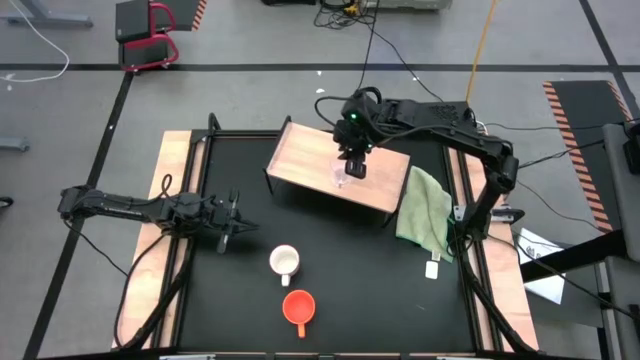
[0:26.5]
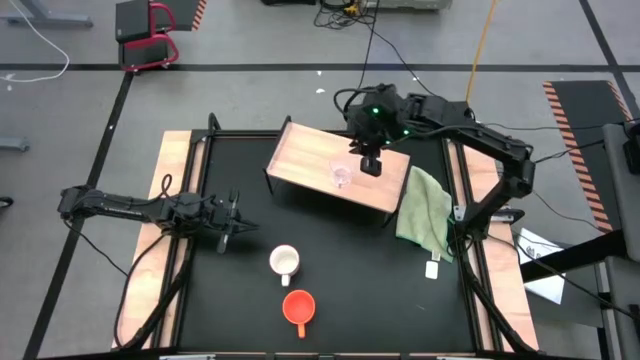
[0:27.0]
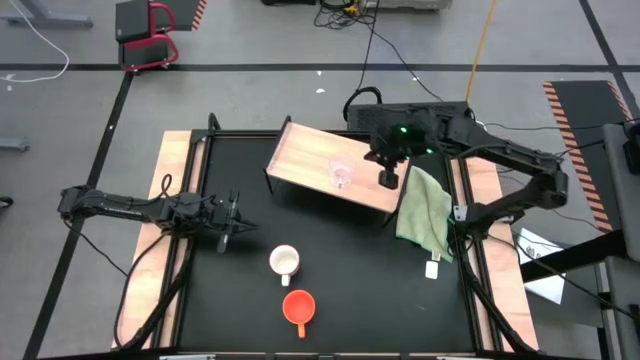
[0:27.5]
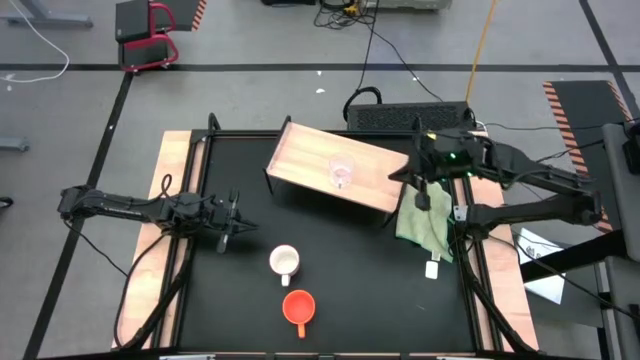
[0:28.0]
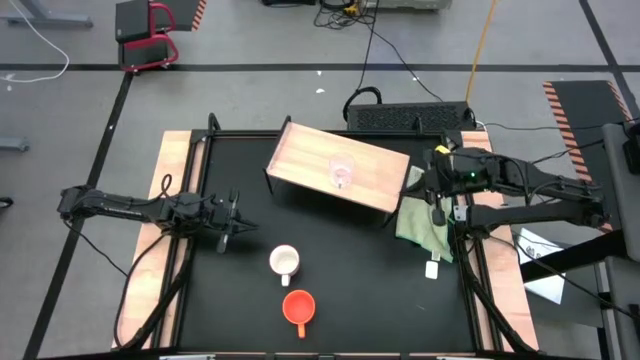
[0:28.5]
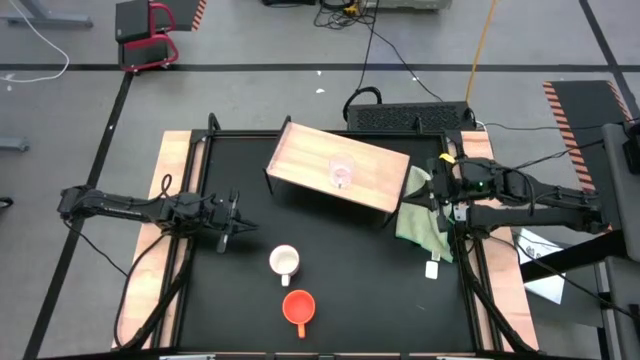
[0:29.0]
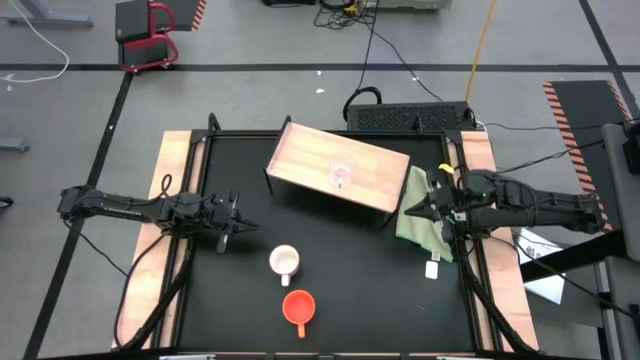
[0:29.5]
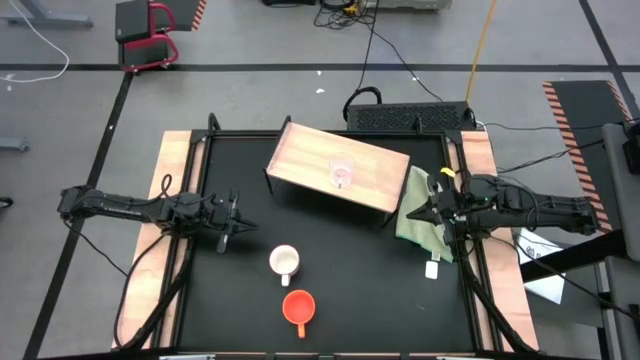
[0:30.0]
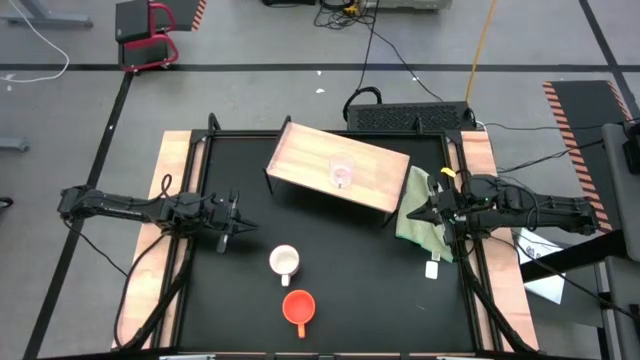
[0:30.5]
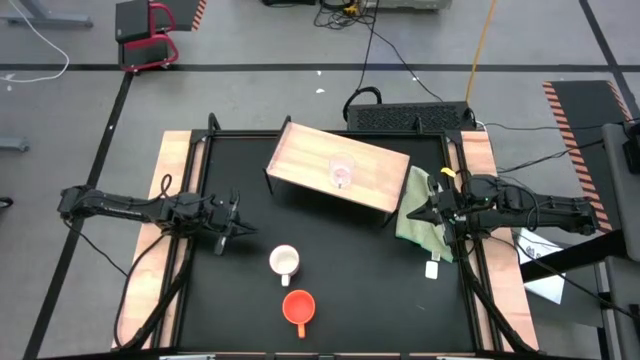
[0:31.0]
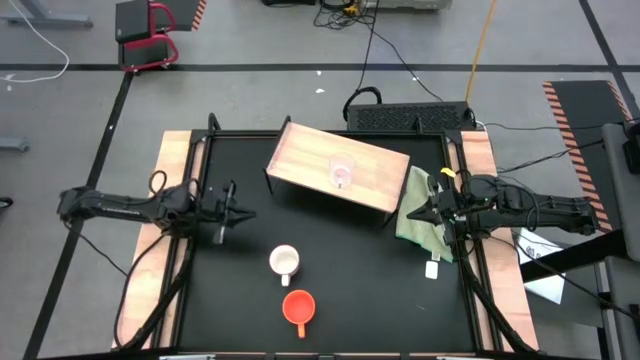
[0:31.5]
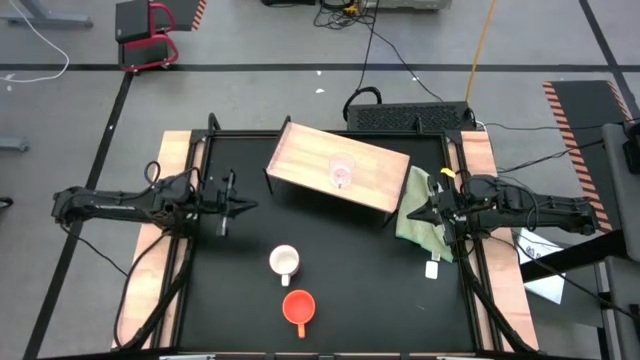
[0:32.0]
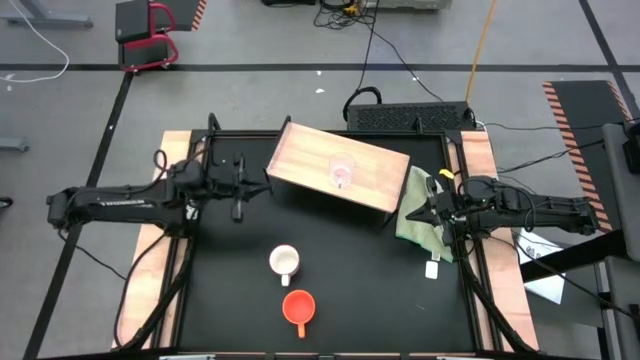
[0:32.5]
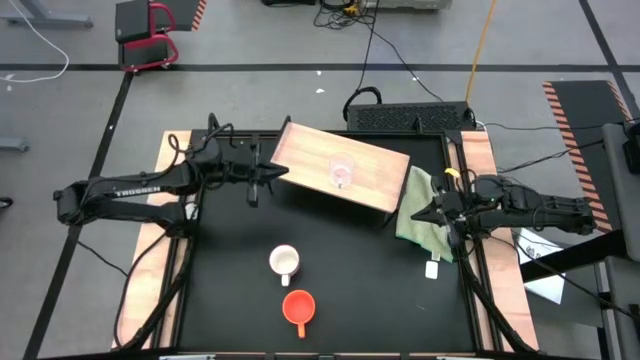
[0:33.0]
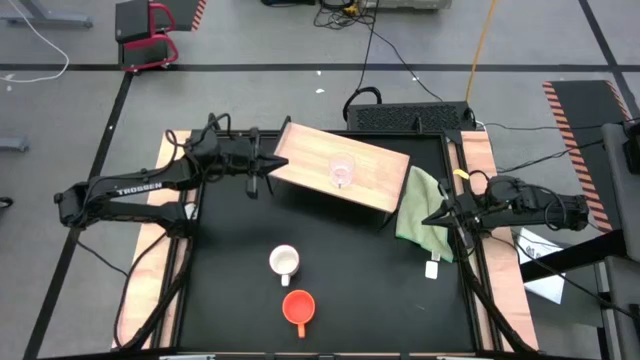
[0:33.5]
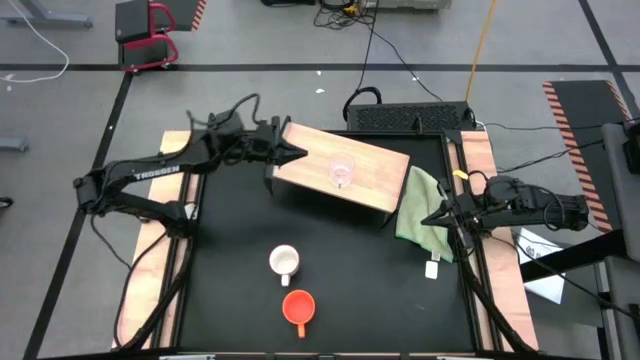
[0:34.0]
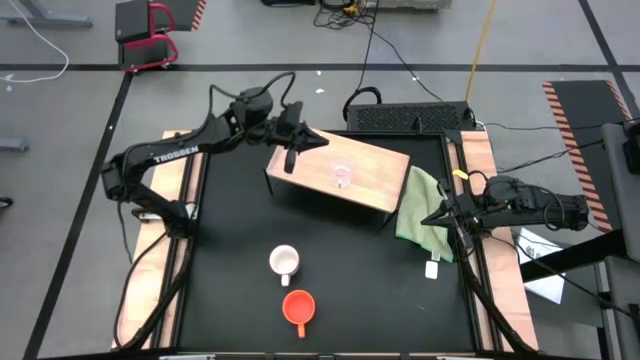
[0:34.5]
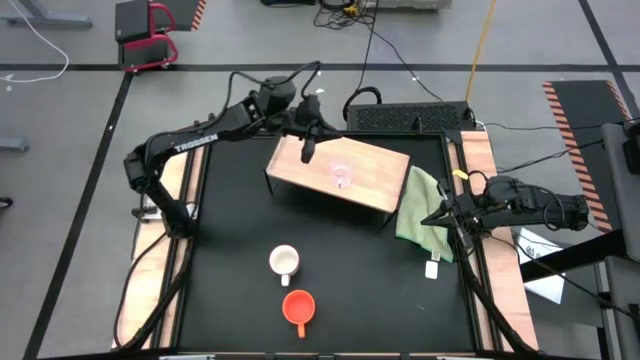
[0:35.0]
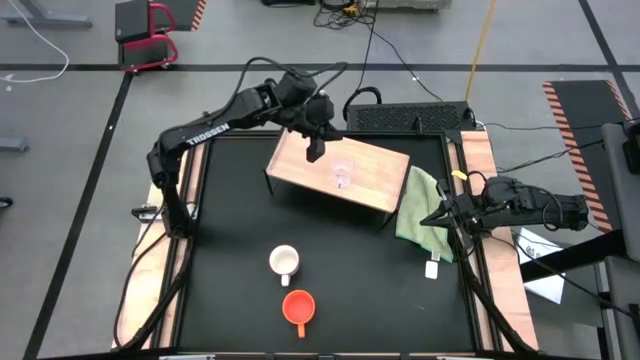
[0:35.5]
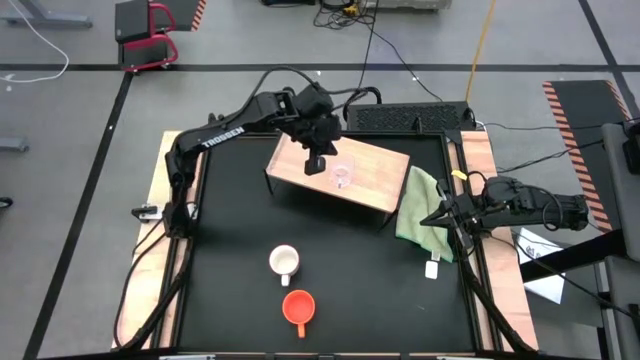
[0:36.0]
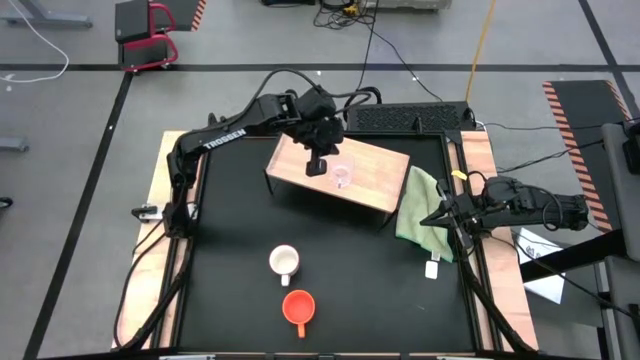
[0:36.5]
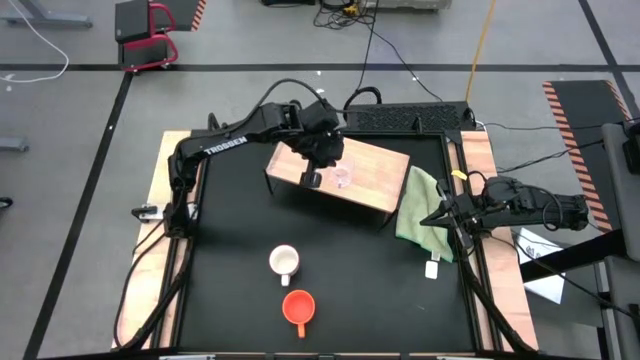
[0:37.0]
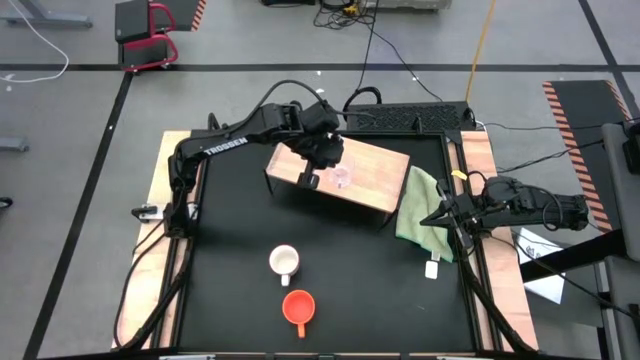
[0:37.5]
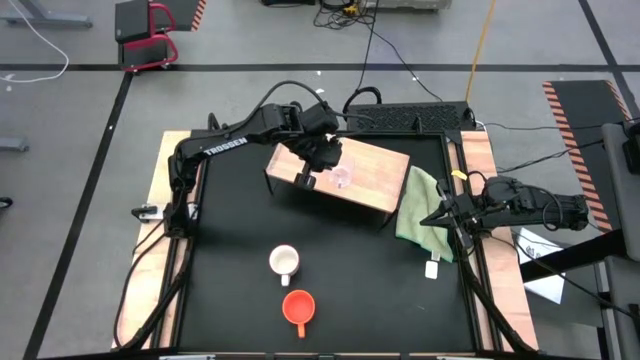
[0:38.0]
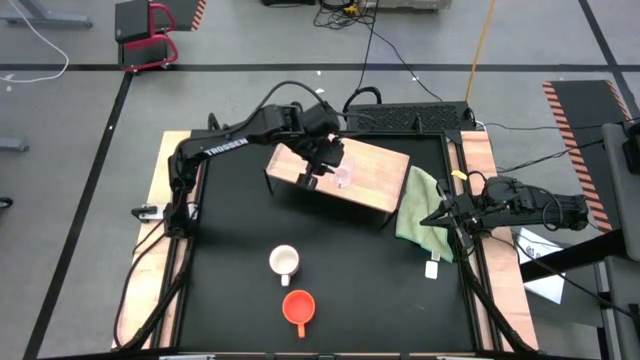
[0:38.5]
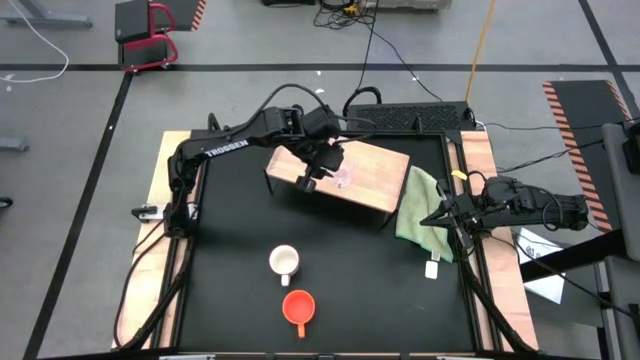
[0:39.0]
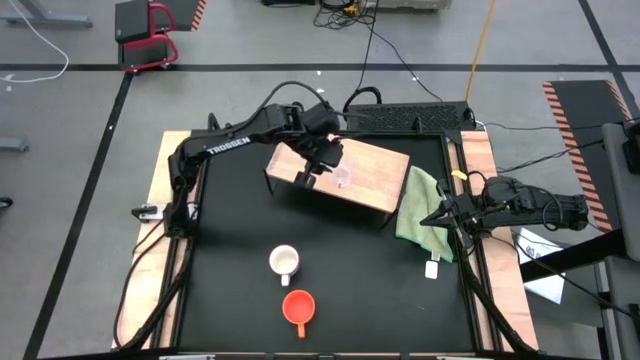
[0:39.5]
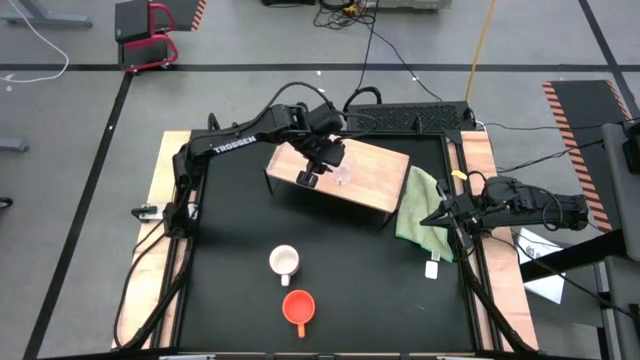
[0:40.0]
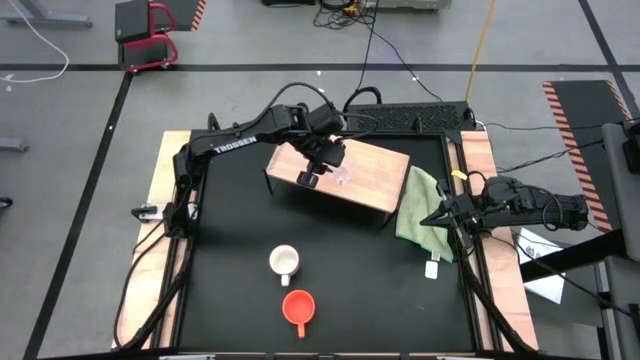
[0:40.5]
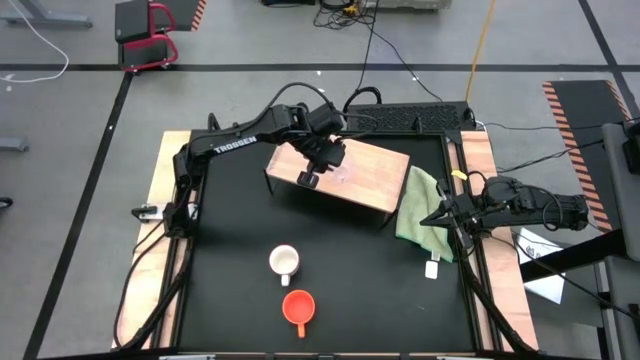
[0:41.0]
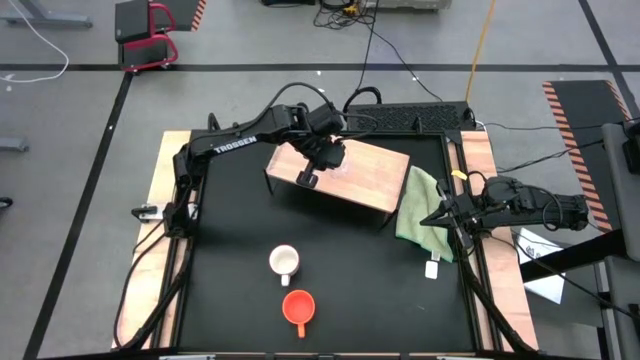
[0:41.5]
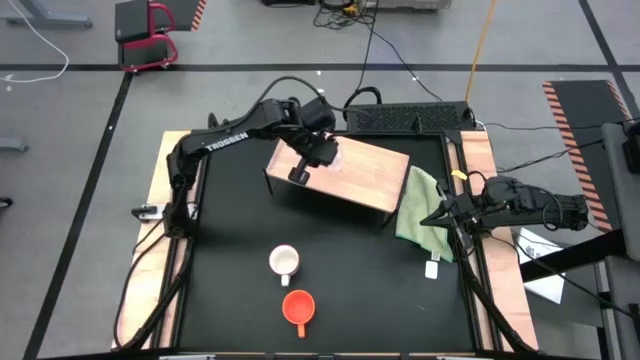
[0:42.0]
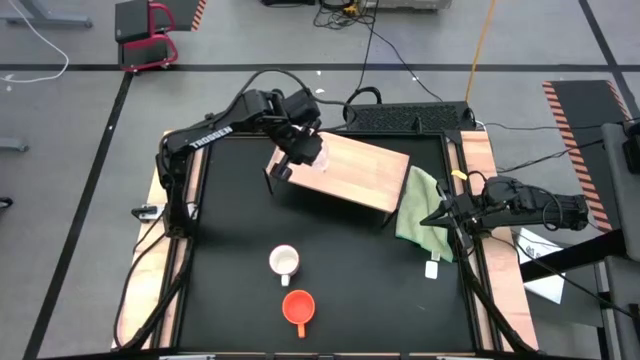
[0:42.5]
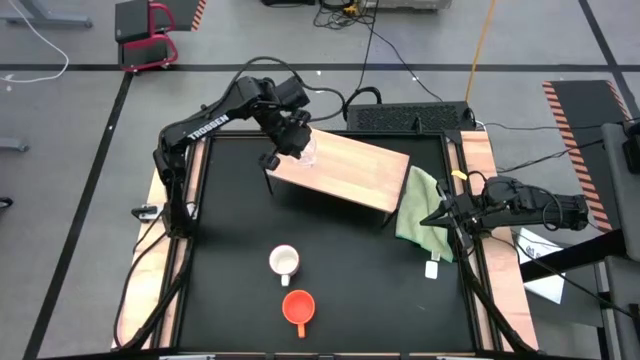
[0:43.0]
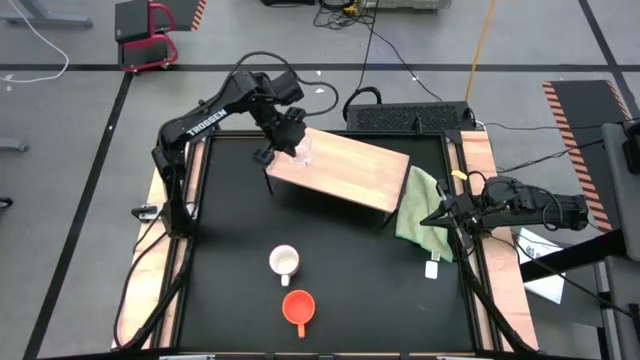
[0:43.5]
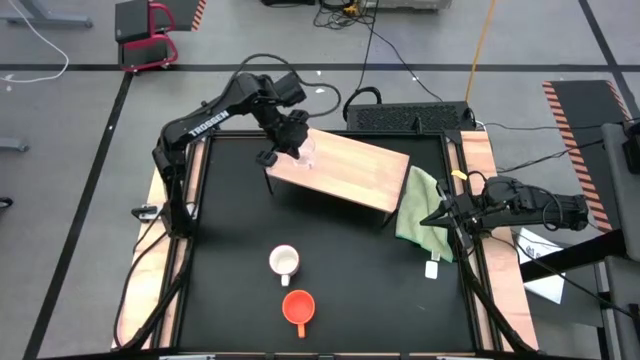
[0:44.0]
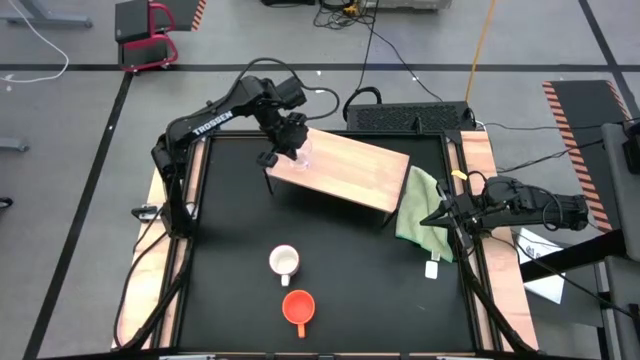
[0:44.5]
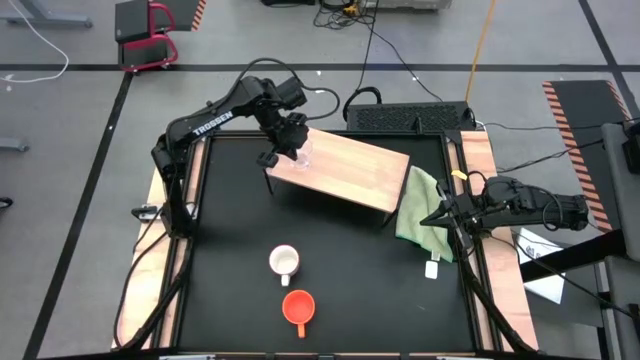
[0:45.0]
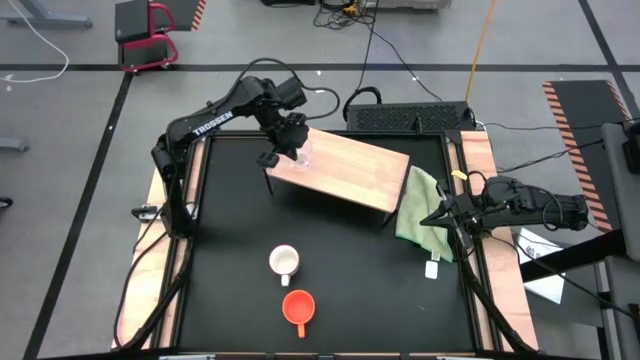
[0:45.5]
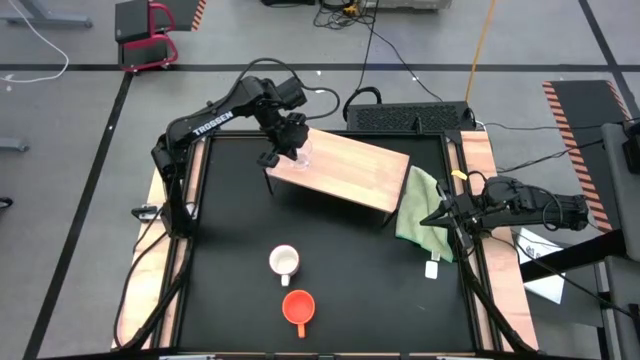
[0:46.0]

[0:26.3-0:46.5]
Task: Stack small to large cups/mugs on shelf
Put the transparent mug on the shelf
